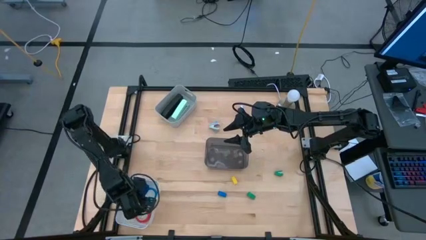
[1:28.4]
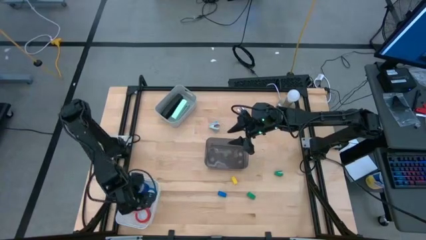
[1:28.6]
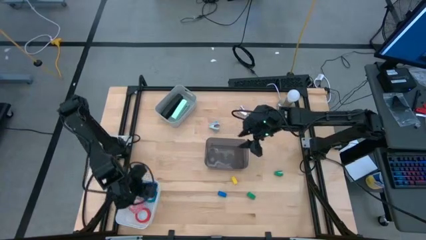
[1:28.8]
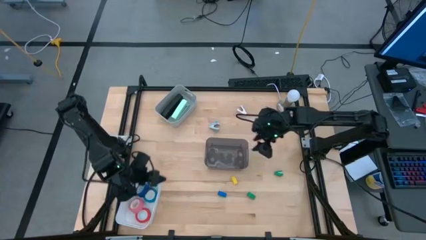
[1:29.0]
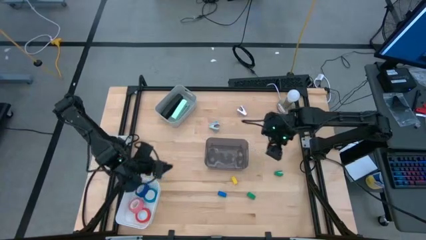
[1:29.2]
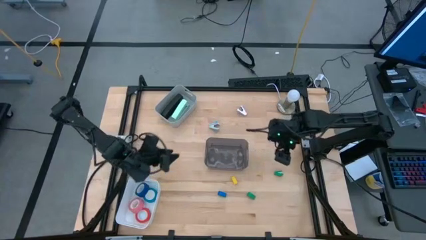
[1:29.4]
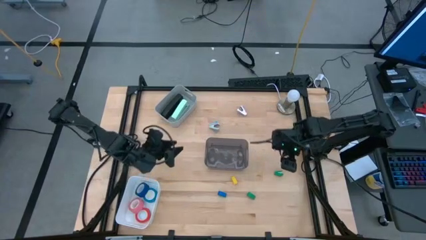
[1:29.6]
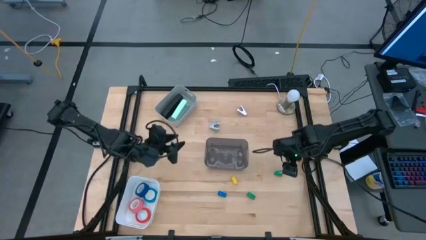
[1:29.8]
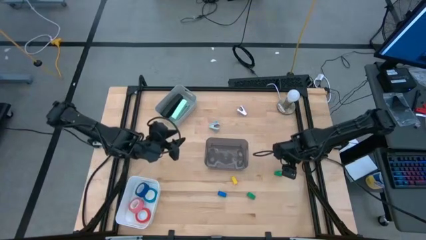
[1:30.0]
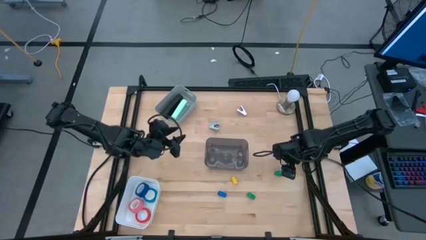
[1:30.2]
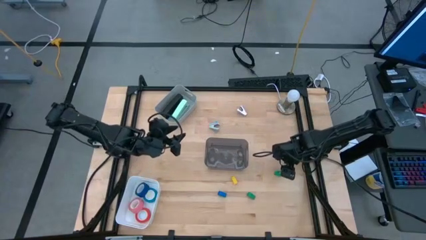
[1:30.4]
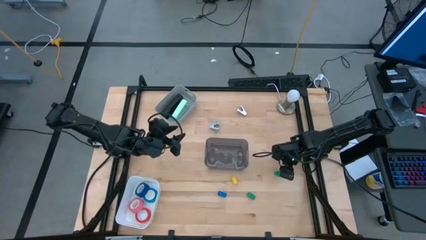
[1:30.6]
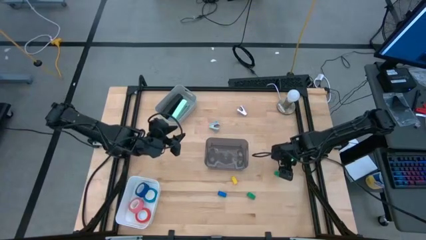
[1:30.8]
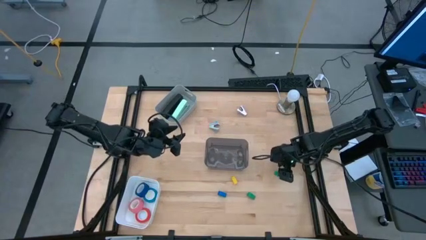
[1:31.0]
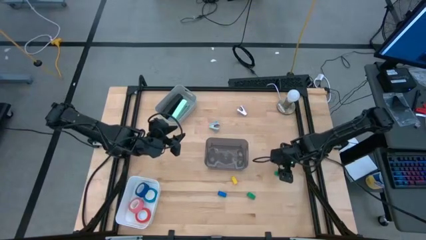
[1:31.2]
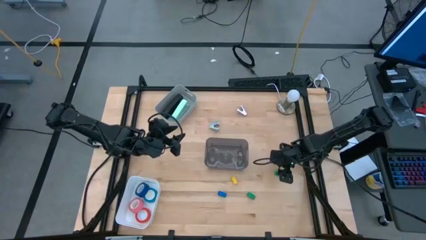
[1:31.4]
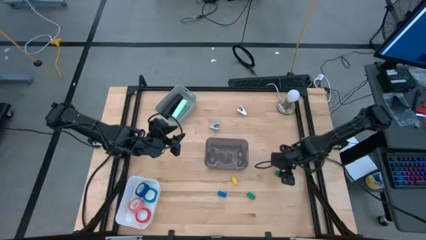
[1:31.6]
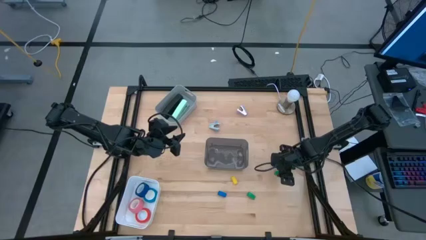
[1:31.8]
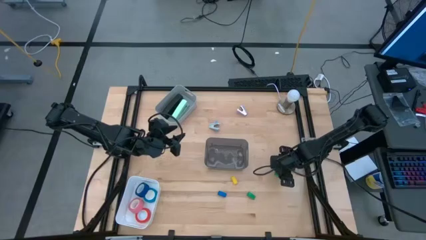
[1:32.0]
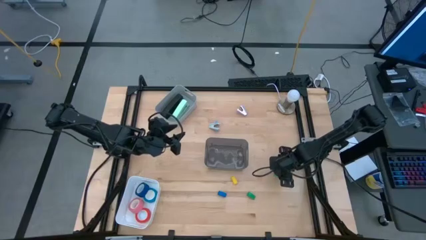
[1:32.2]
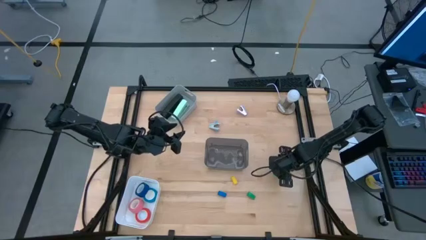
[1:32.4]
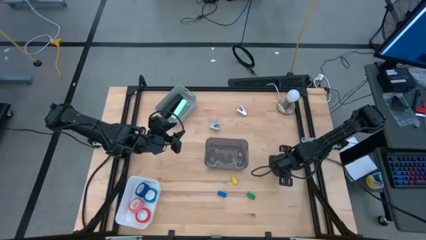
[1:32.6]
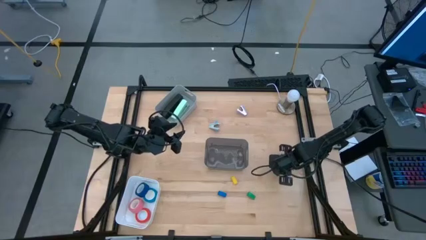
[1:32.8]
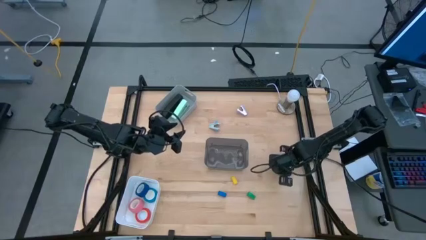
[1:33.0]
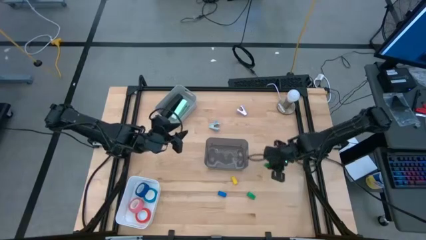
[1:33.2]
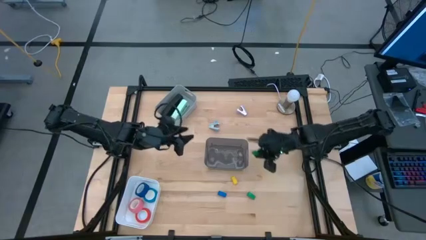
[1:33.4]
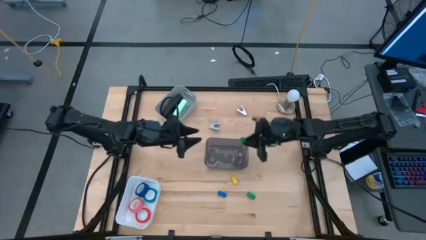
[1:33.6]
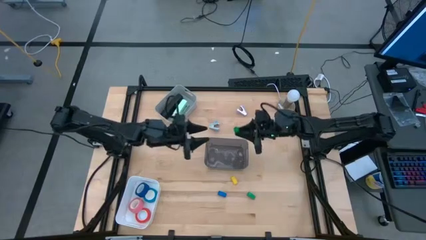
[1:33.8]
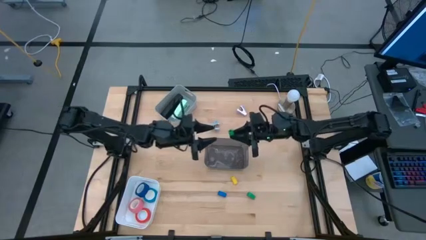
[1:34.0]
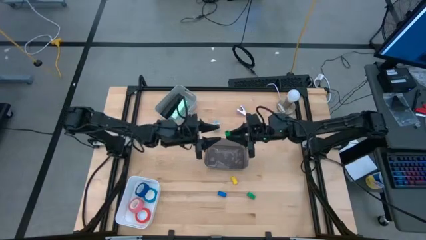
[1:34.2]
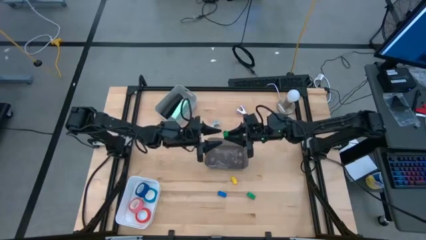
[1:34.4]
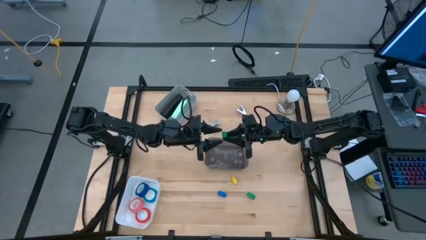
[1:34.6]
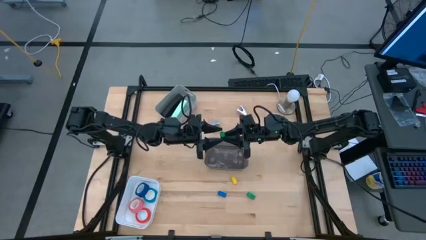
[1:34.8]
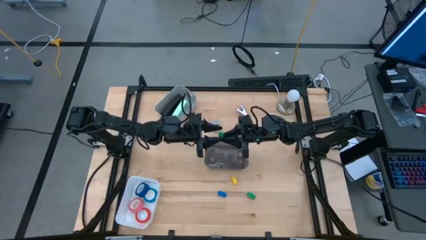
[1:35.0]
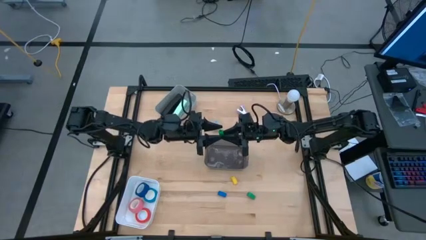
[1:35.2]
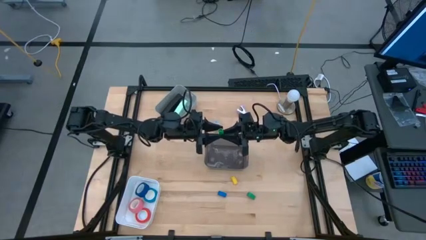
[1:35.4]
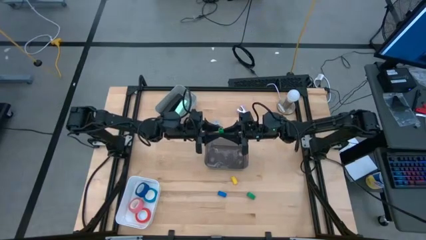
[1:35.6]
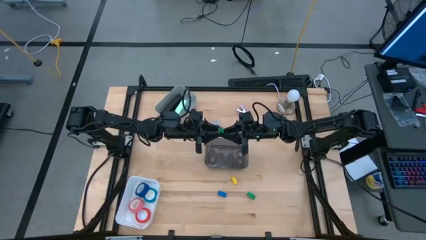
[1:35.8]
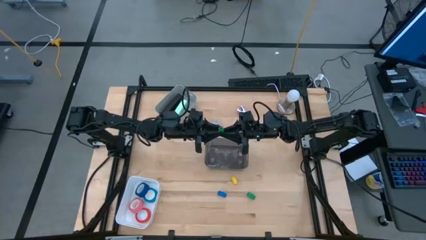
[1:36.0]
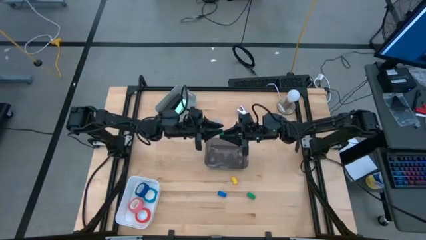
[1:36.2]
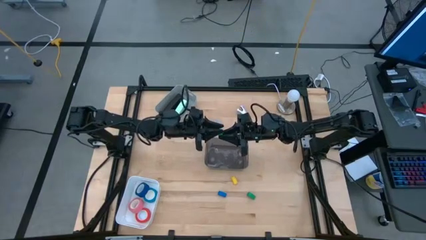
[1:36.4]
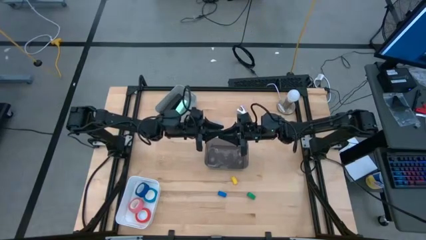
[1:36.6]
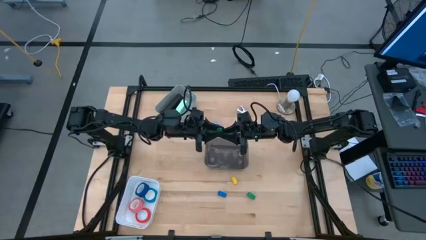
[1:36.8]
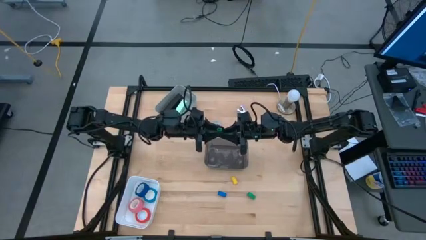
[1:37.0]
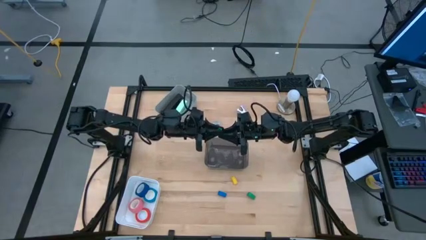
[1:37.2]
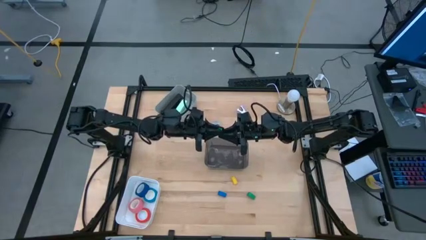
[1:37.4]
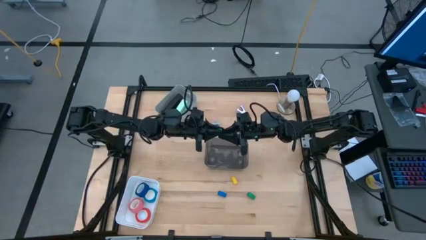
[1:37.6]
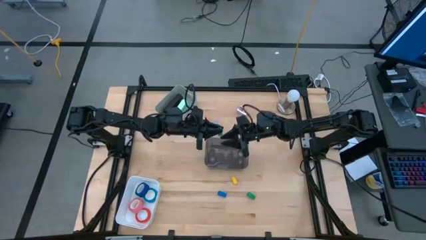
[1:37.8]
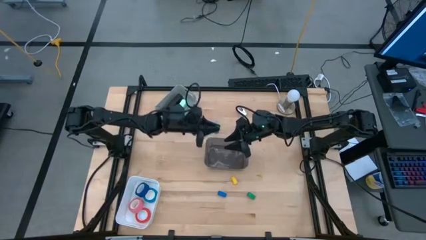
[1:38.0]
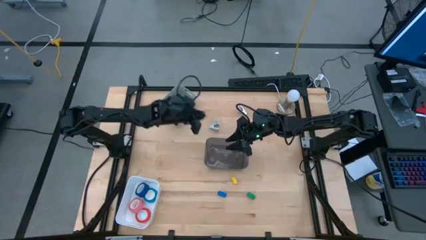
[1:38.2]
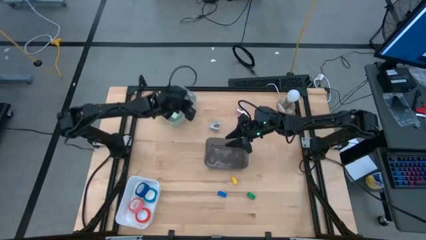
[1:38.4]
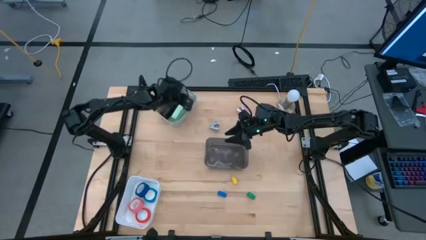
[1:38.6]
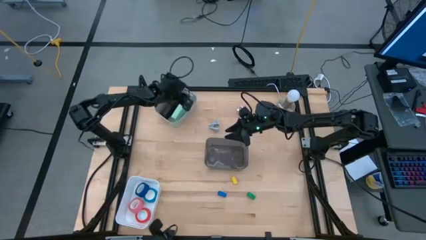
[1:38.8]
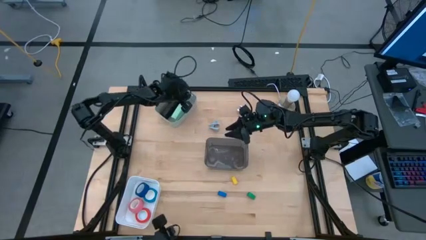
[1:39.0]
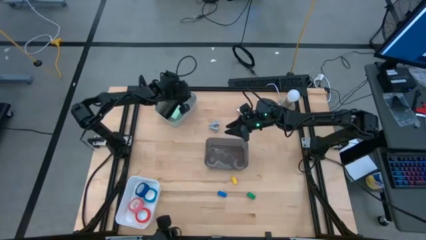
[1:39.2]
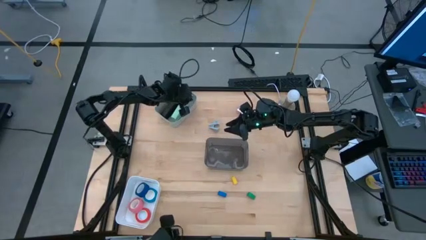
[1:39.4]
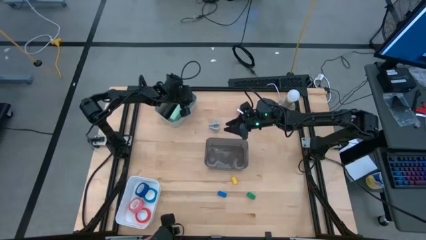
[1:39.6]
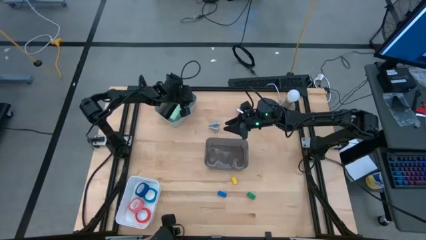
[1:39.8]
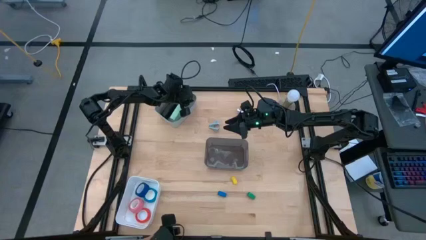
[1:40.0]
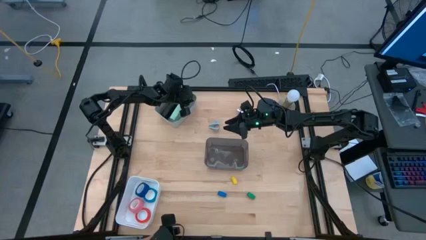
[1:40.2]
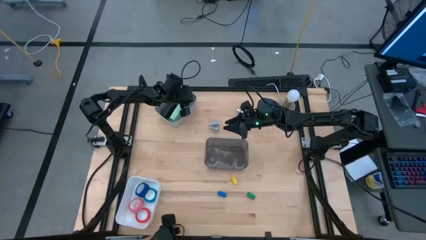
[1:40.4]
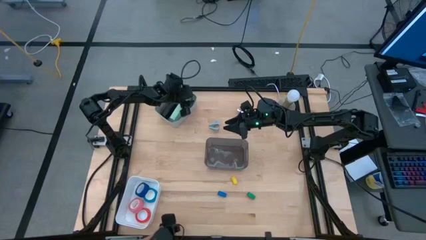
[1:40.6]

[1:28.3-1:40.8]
Task: Pick and place Stapler, Stapler remover, tape
Put the top right small green stapler into the gray bin

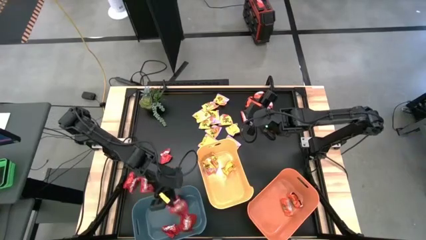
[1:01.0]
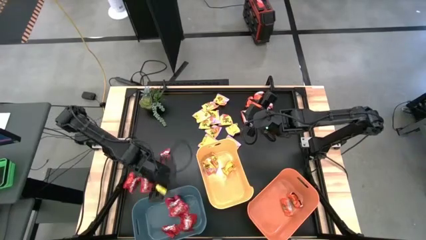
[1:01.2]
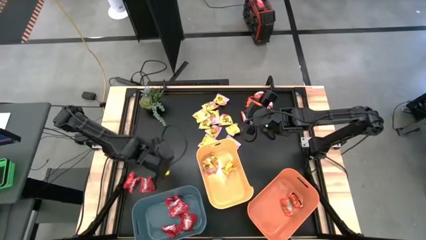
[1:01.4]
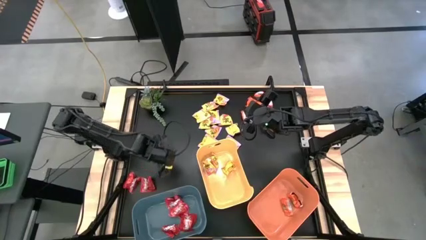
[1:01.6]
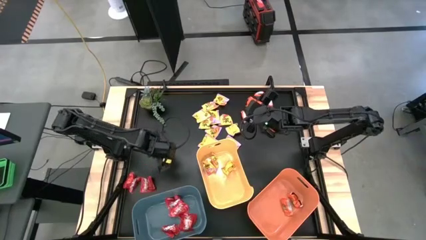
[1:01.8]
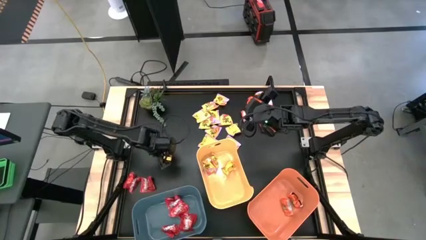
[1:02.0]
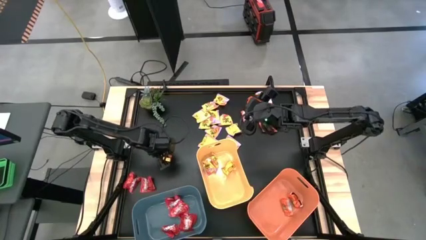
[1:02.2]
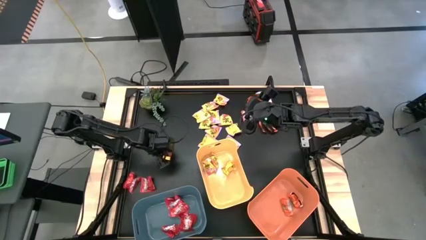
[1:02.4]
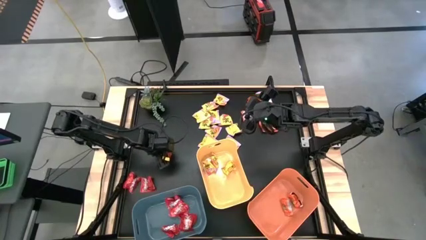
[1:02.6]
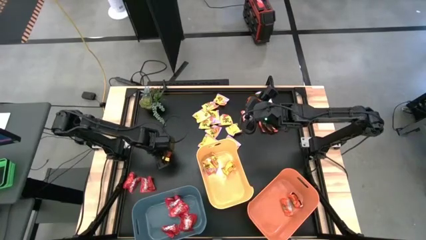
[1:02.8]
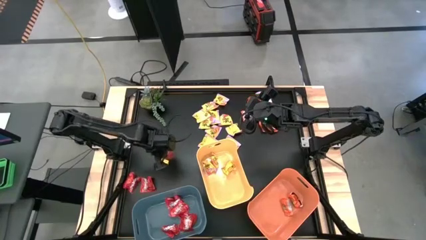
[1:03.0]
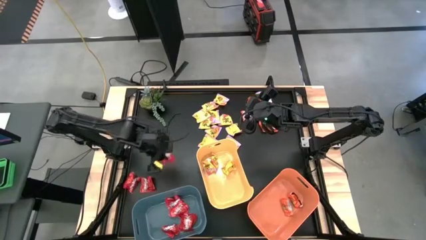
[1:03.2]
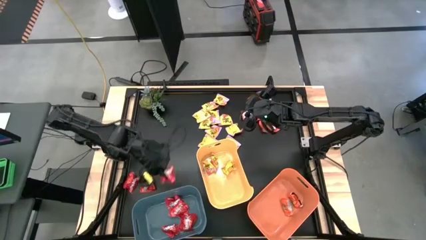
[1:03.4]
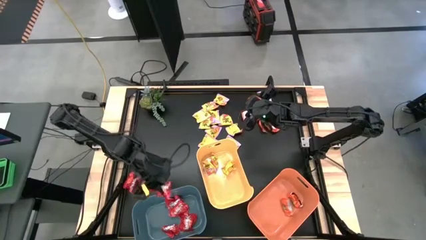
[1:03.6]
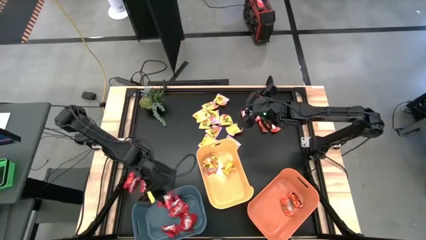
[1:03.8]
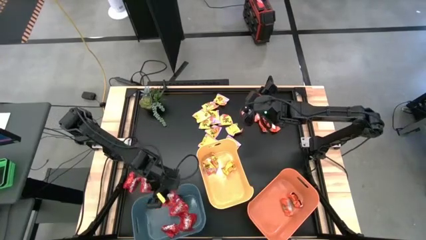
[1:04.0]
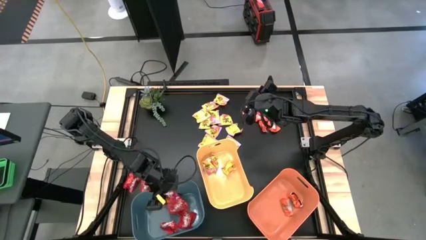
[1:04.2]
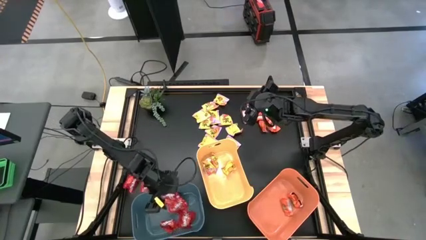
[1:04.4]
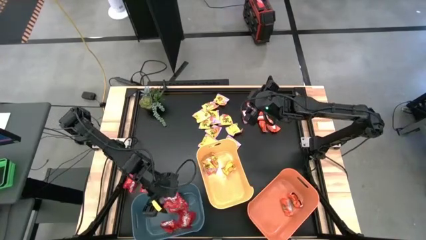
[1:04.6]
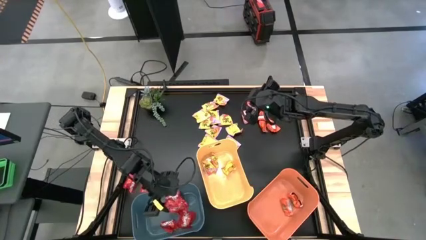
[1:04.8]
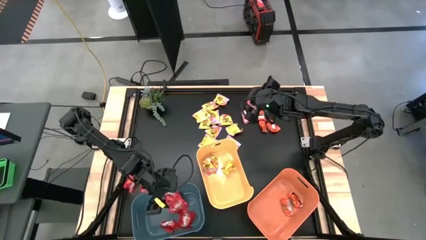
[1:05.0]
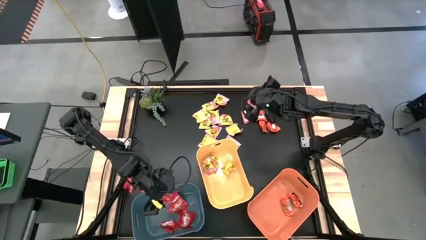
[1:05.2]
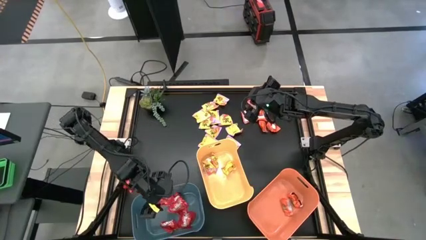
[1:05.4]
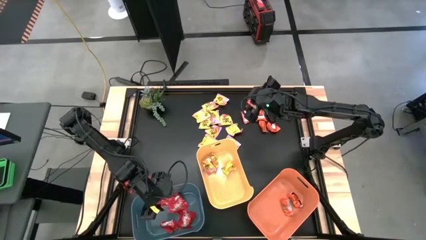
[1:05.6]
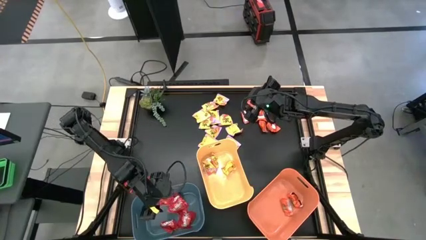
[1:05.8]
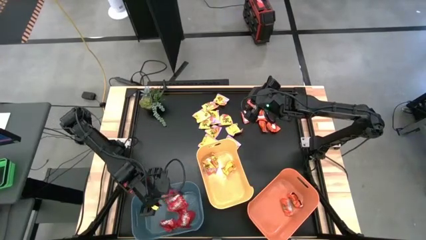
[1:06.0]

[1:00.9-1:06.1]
Task: Sort candy
Put the red candy into the blue bin
